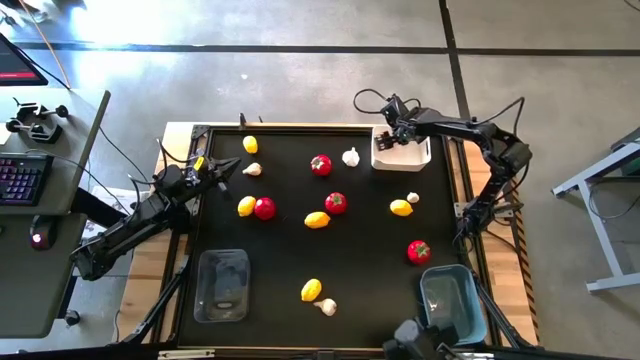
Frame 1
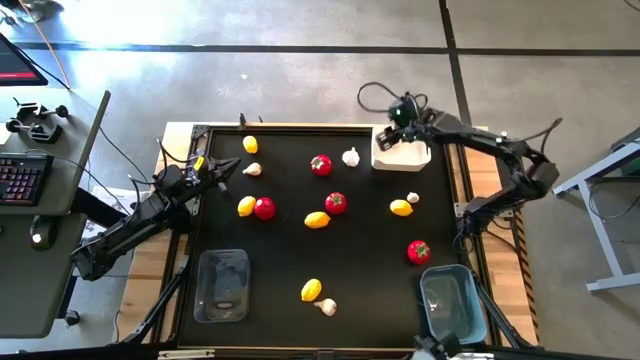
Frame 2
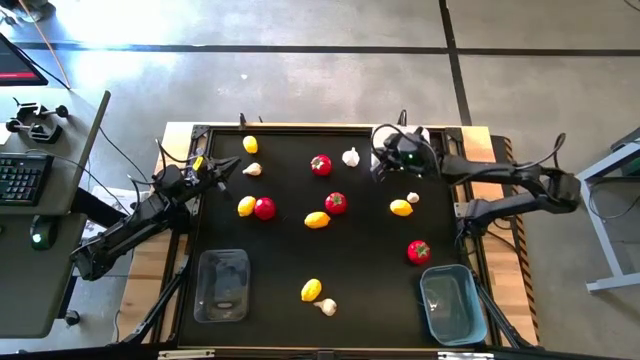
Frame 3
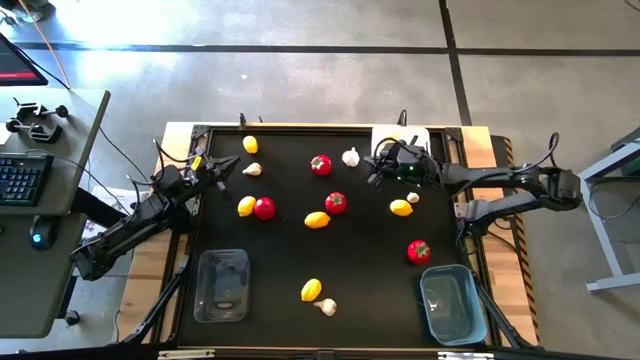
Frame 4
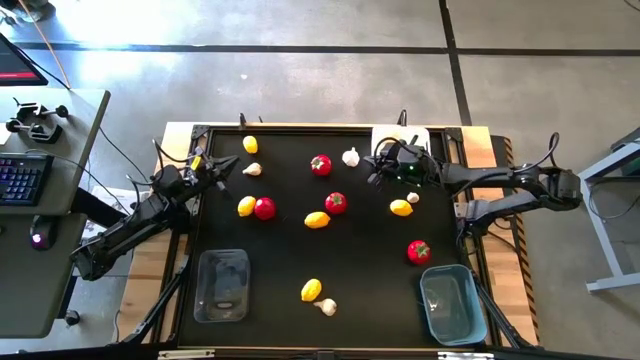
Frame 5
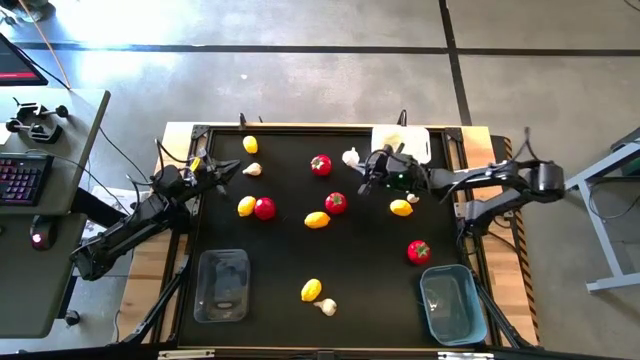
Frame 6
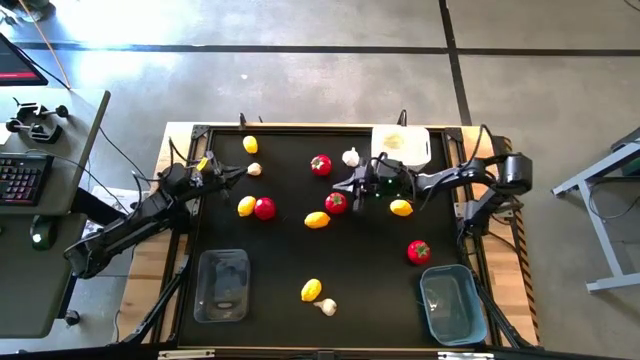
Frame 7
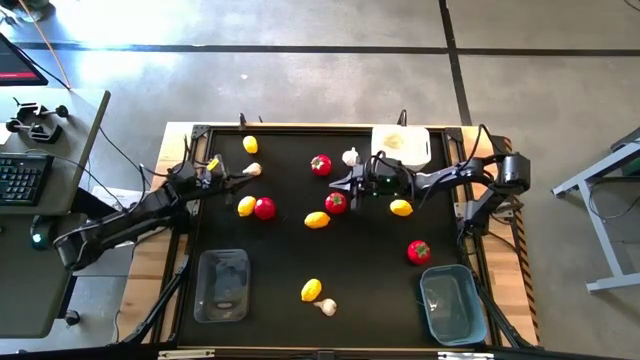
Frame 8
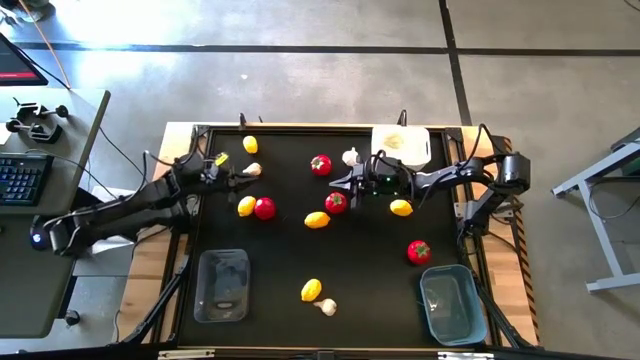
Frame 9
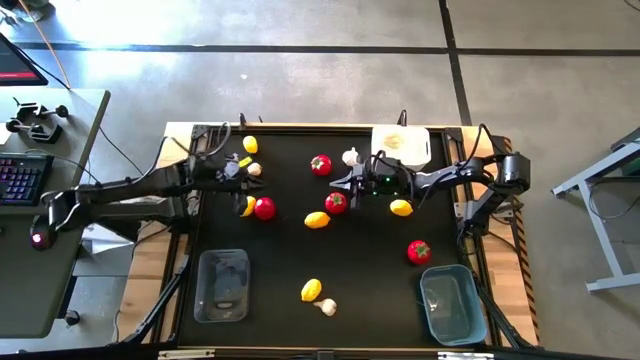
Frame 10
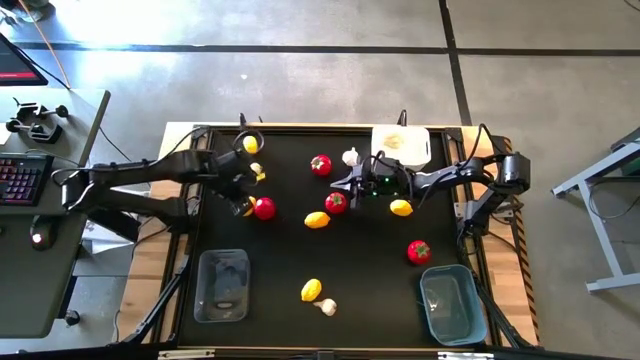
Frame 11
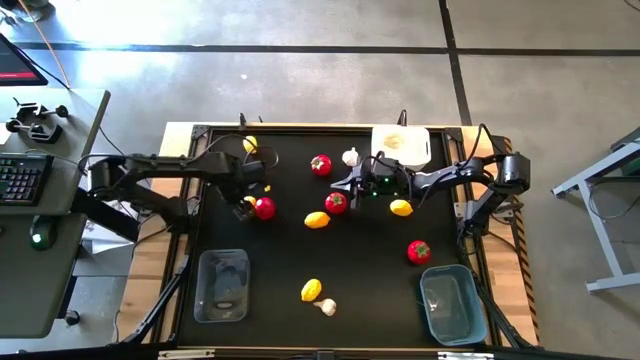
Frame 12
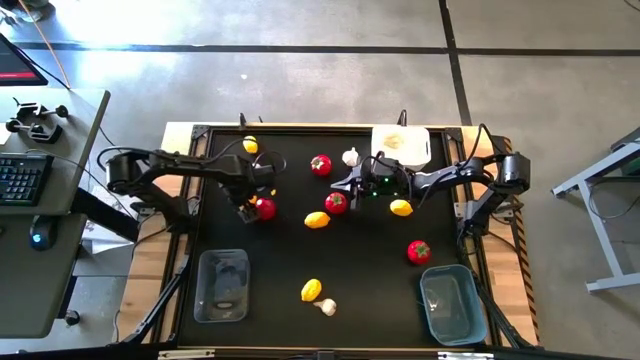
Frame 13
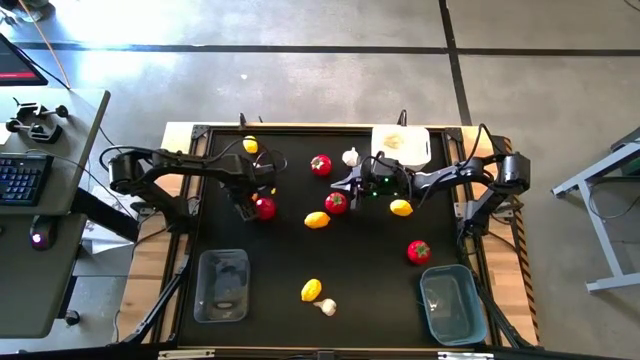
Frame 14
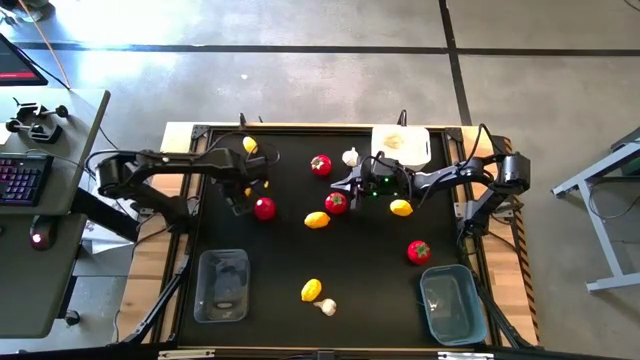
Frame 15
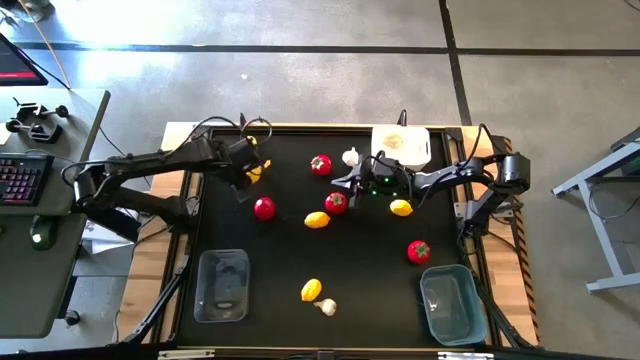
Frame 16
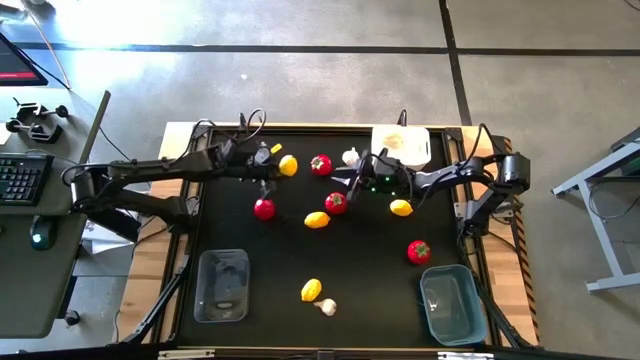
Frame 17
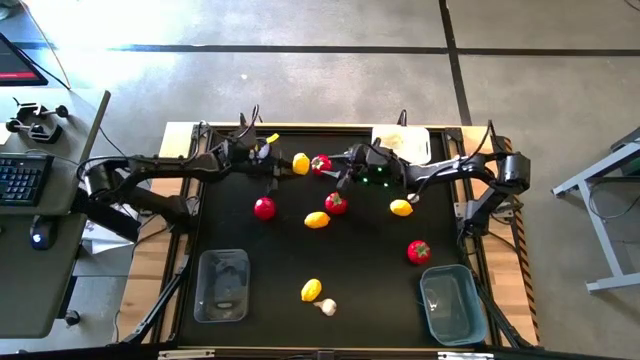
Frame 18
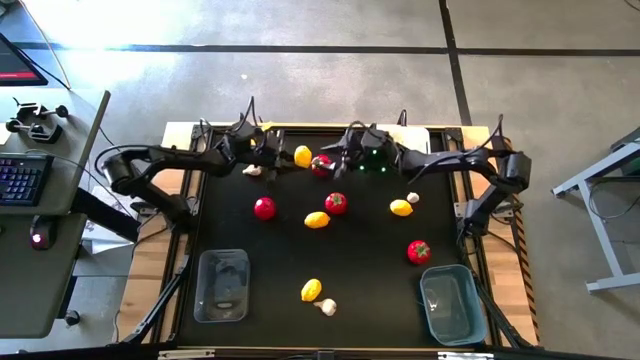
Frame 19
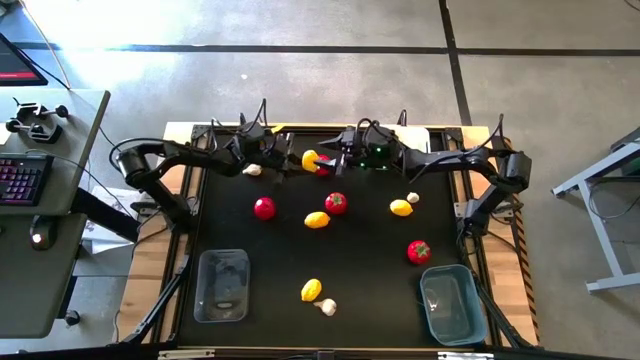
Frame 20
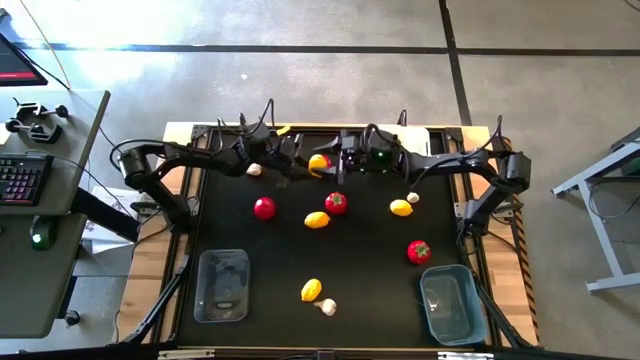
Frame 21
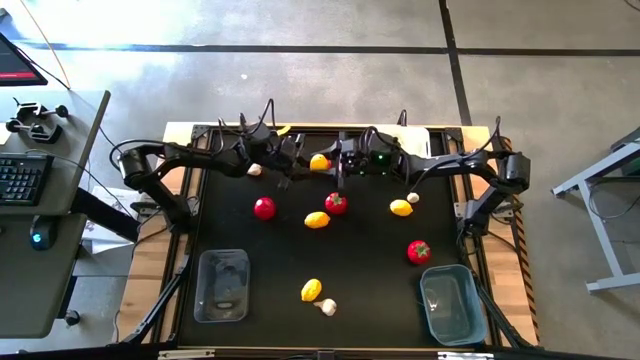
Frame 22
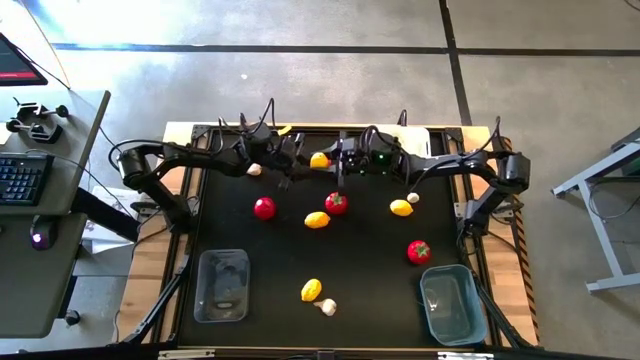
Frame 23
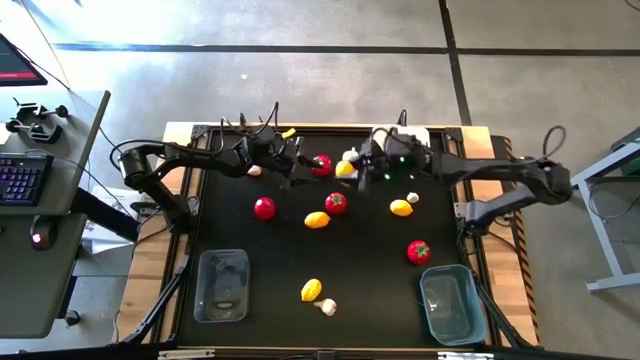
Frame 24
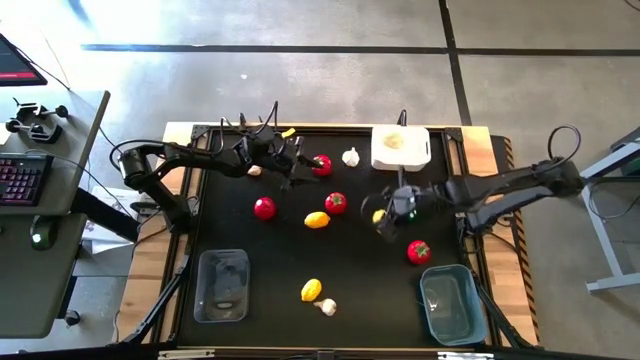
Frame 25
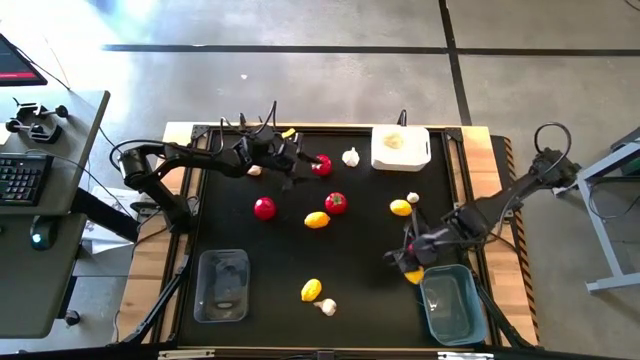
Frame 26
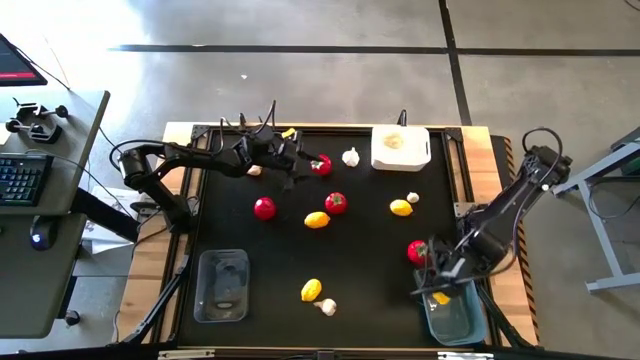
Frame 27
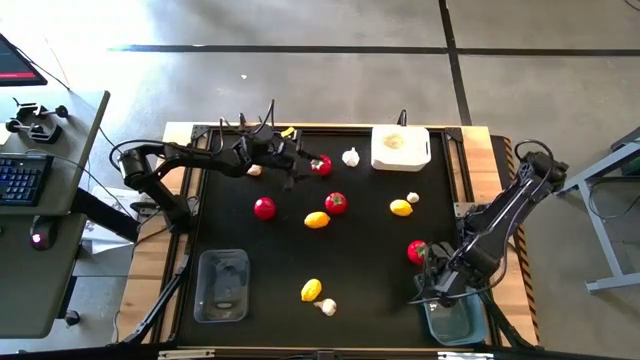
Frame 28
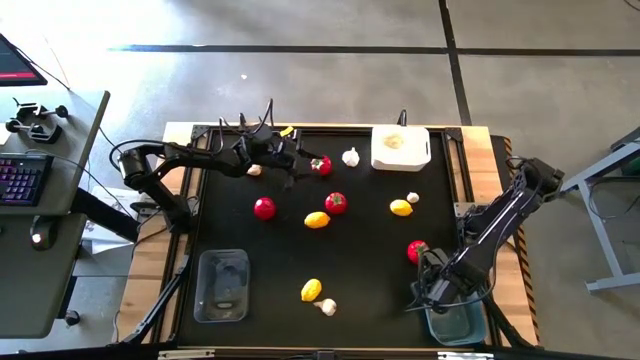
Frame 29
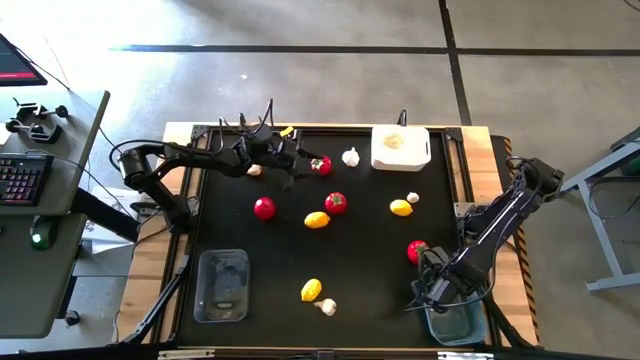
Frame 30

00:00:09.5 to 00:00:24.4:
Task: Sort produce into baskets
Put the lemon into the blue bin

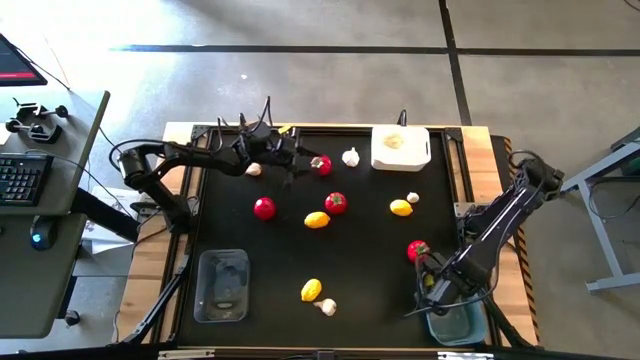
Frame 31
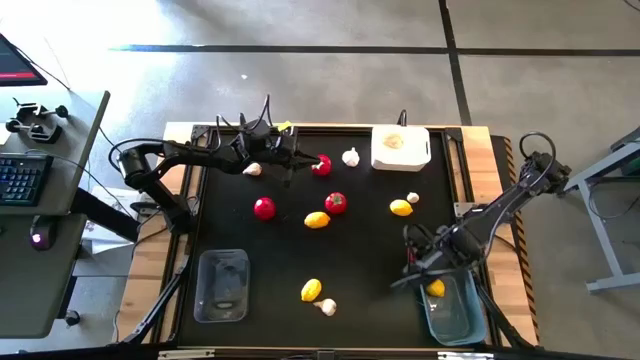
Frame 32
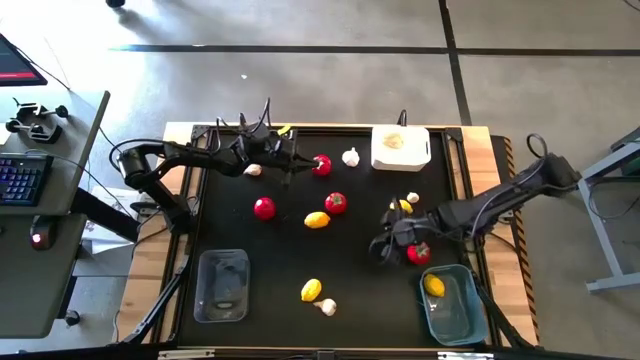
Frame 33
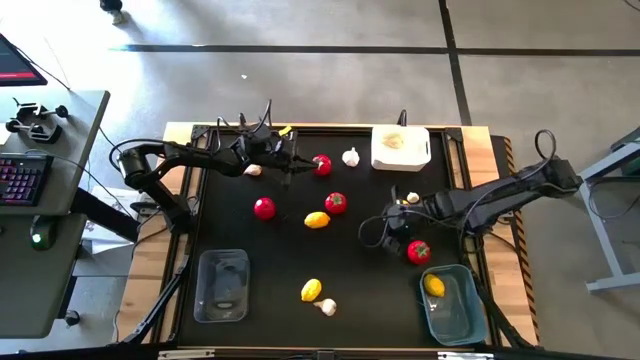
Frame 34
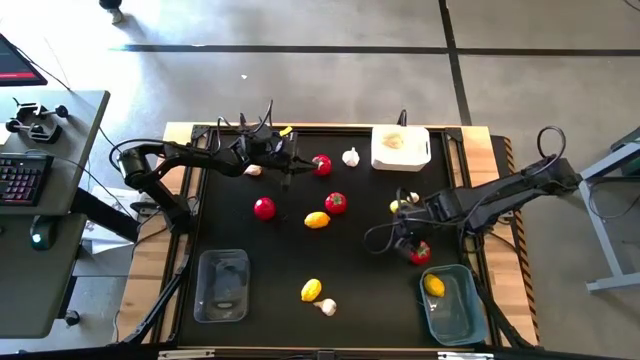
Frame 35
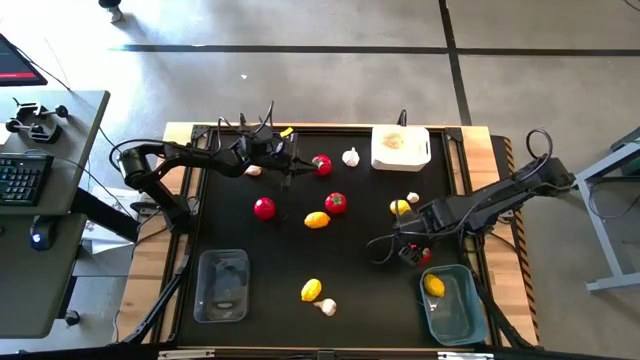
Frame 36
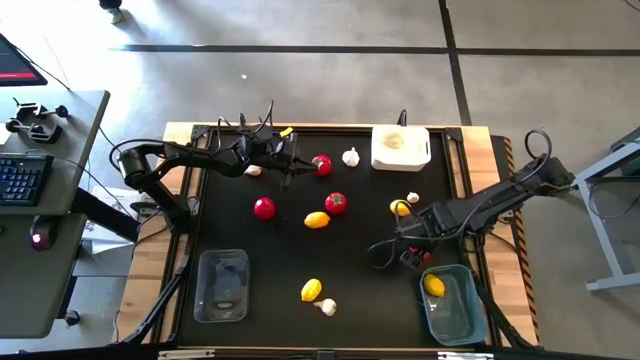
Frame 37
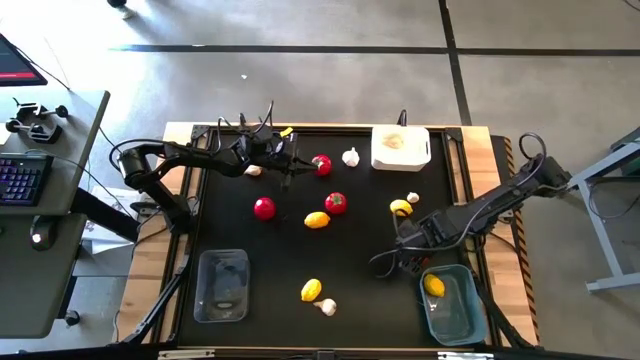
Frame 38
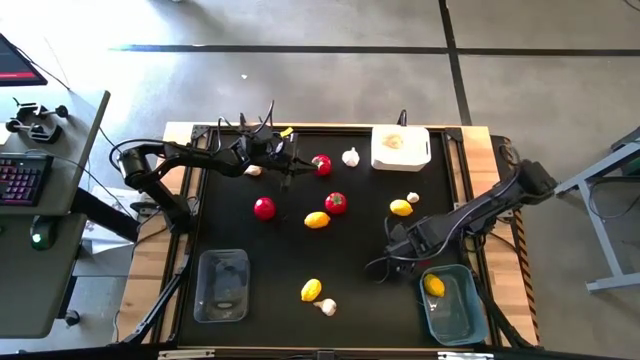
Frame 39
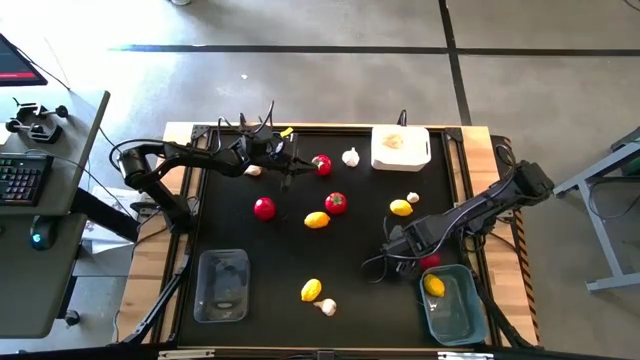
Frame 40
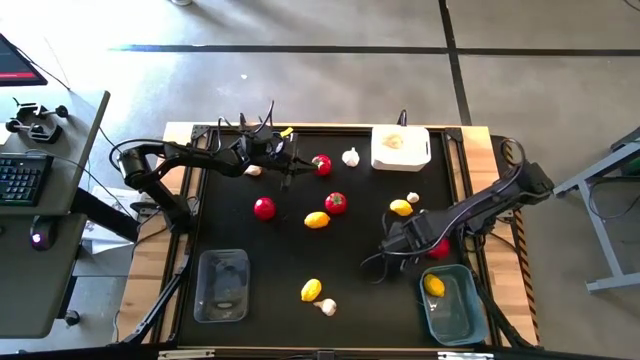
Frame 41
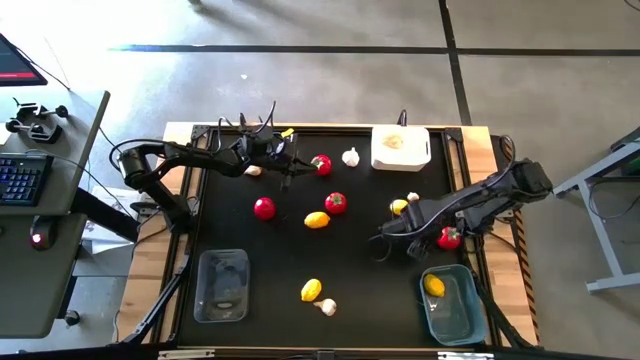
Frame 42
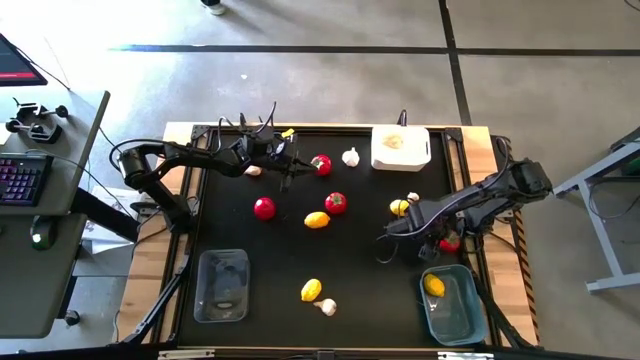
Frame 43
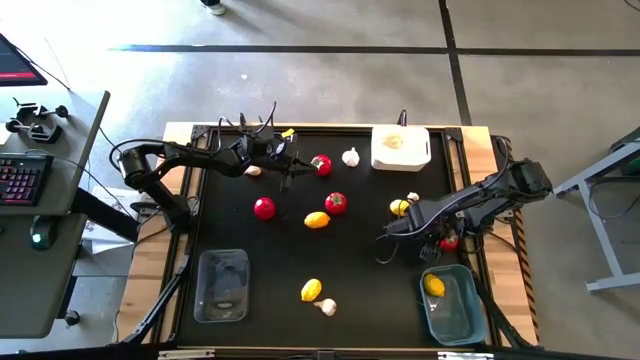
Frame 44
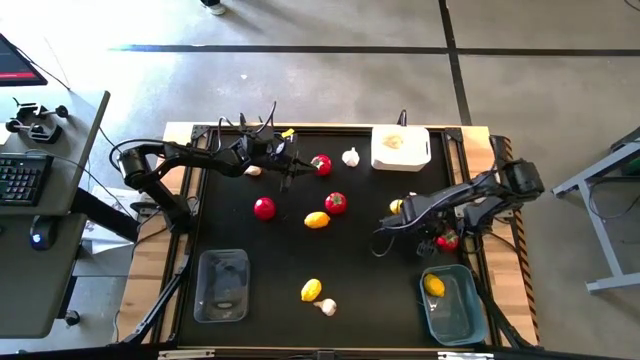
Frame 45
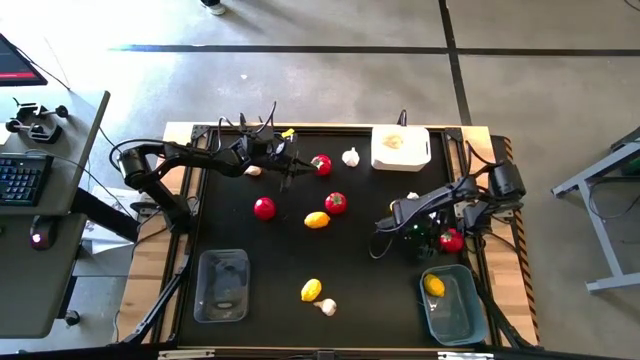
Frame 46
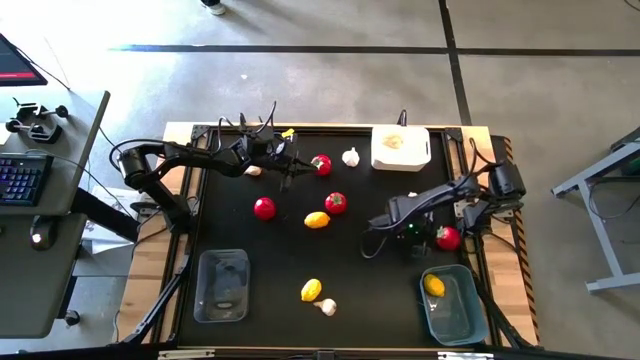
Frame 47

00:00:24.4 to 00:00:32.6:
Put the tomato into the transparent bin
